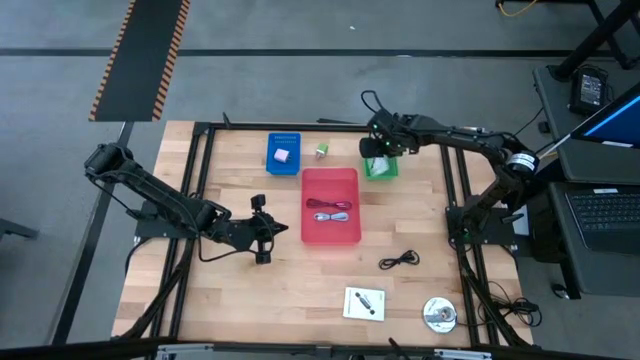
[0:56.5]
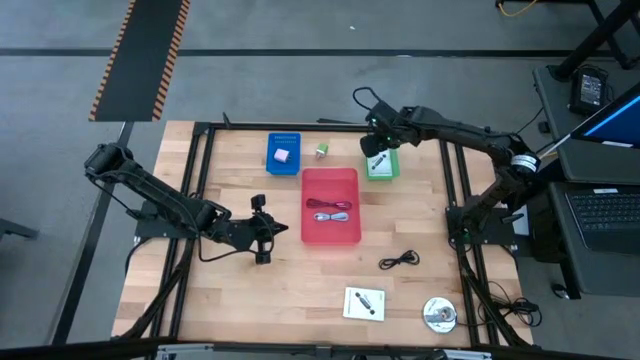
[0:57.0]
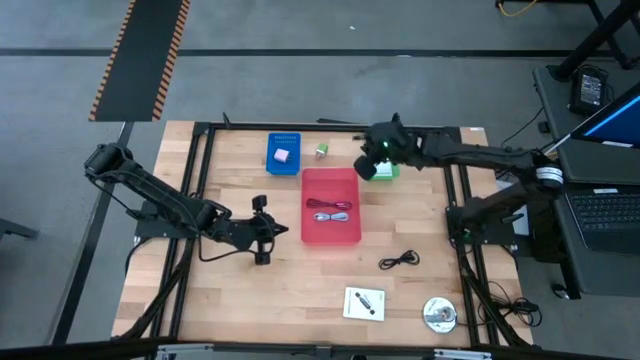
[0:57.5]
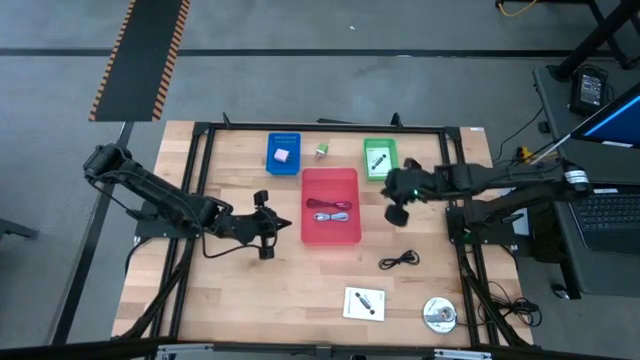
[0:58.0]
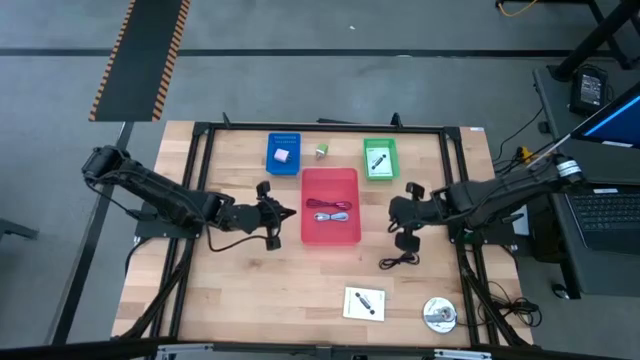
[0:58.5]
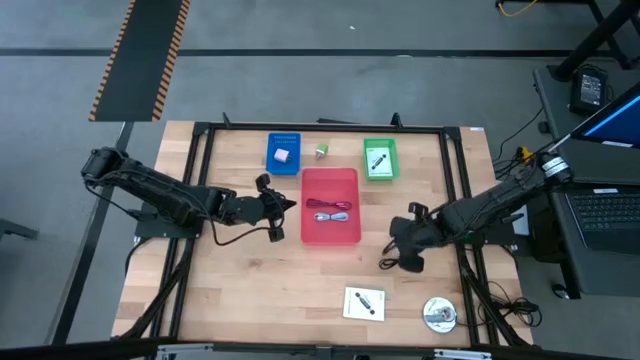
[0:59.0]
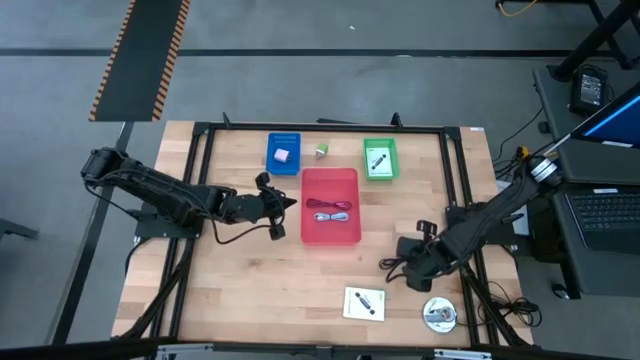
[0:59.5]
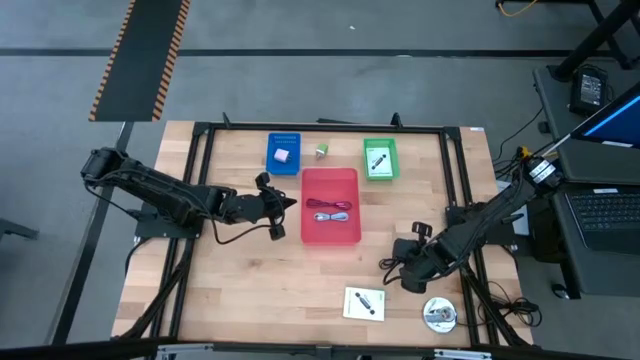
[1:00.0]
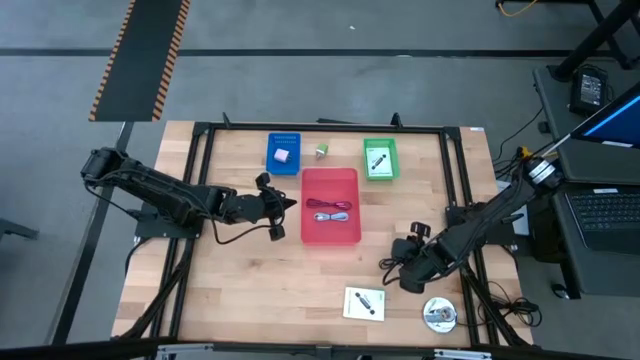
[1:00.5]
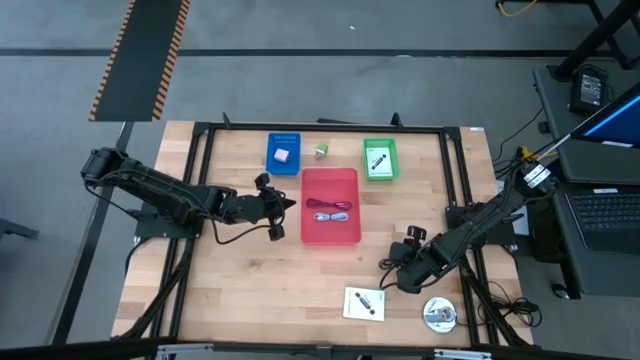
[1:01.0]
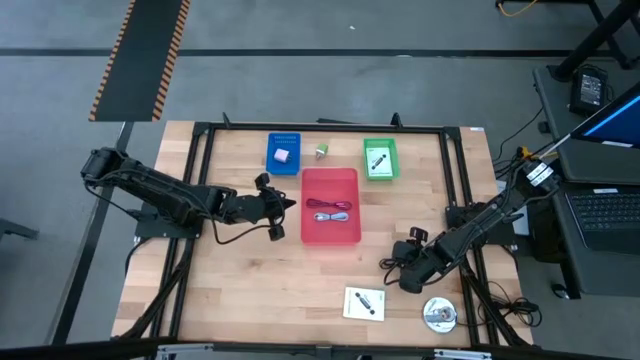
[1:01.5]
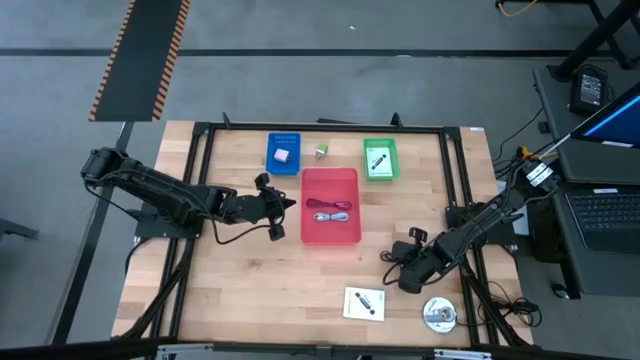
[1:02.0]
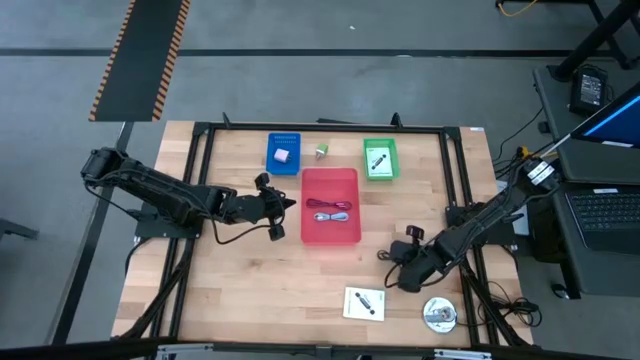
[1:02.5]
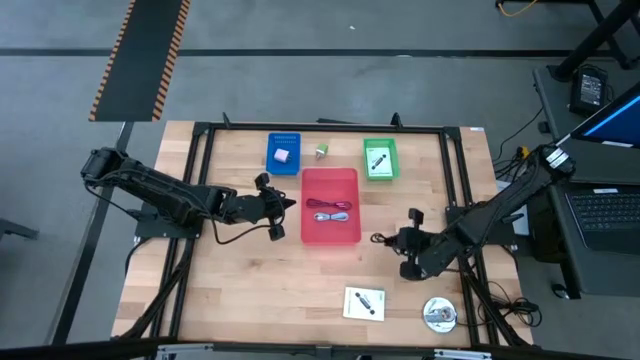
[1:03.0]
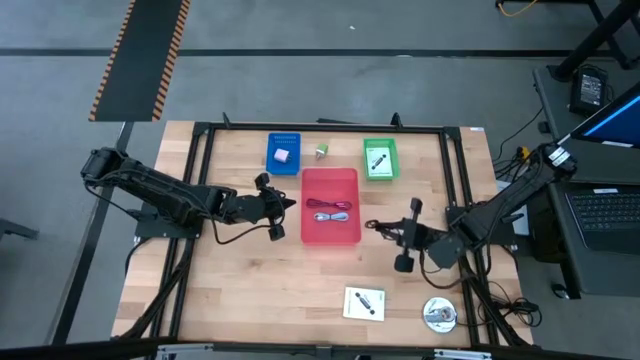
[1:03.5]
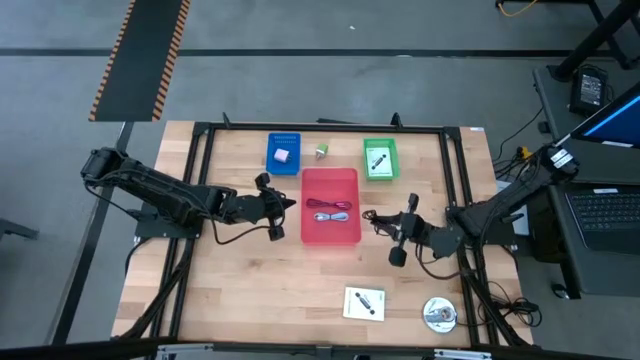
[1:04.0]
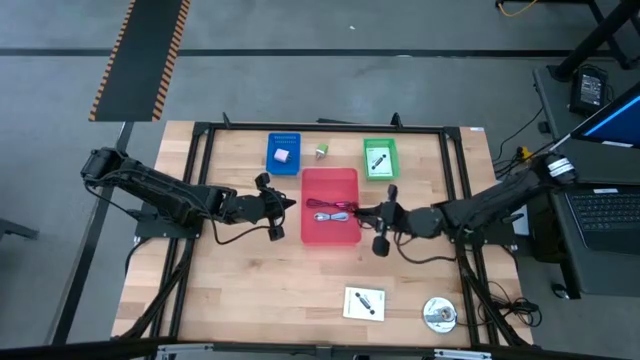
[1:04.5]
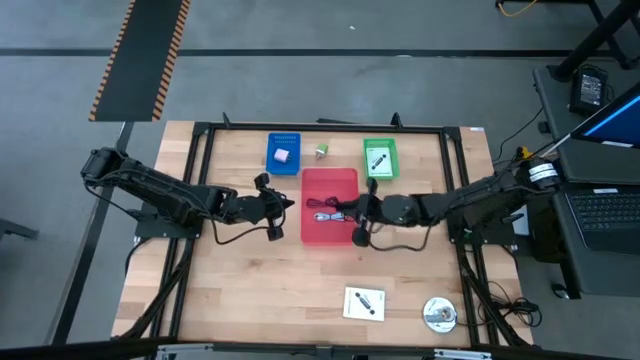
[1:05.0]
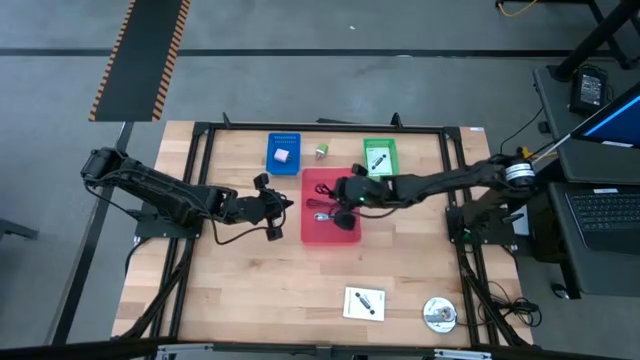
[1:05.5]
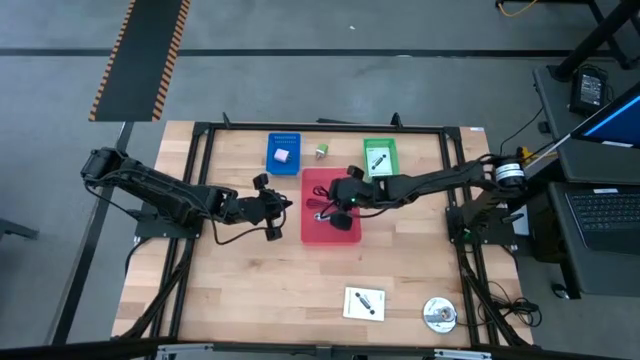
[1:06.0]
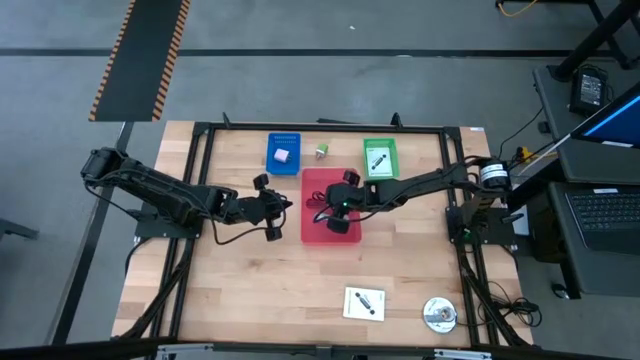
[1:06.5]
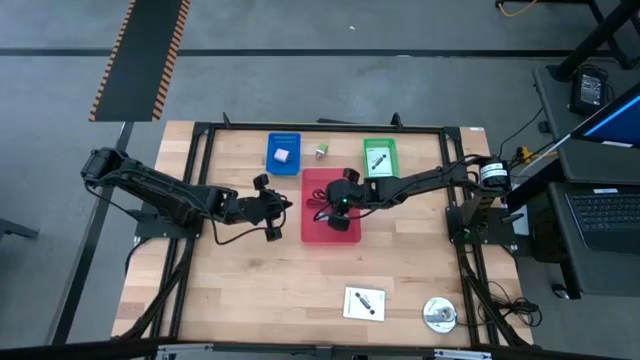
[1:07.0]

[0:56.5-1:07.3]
Task: Pick and place items into bin
Put the black charger cable into the red bin

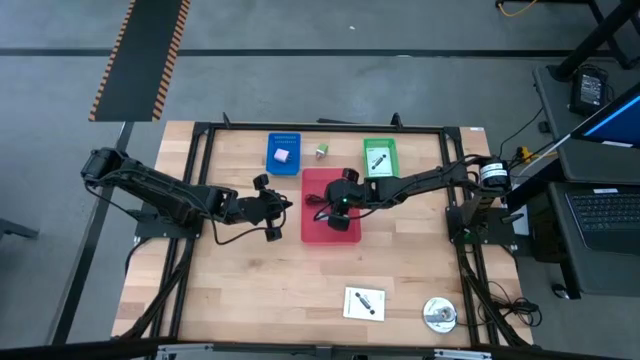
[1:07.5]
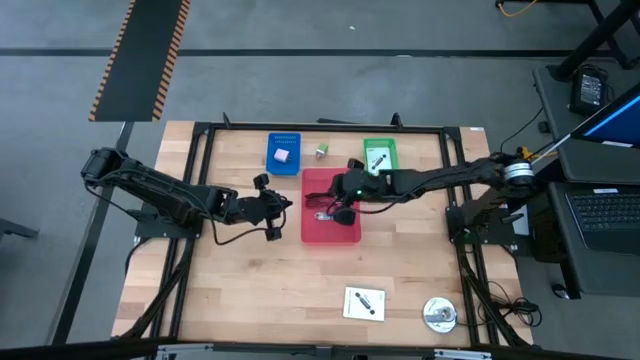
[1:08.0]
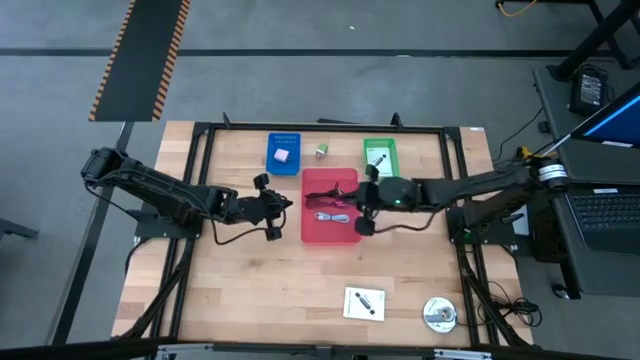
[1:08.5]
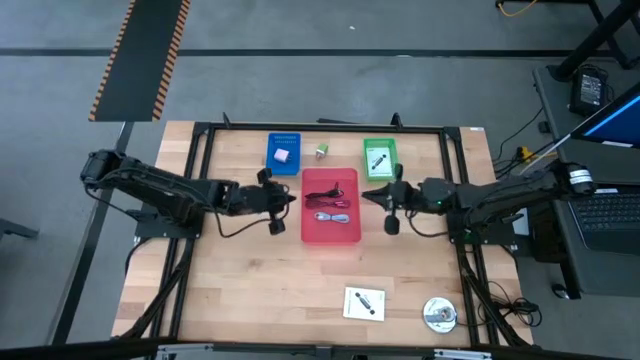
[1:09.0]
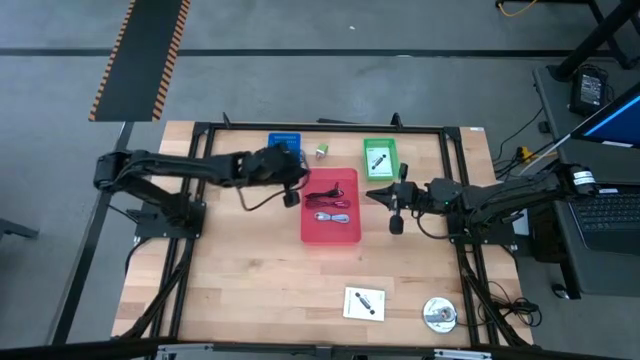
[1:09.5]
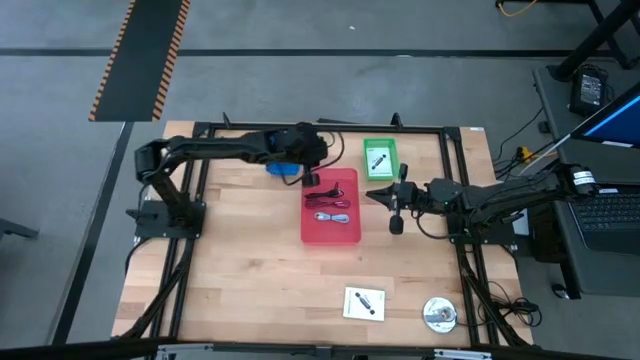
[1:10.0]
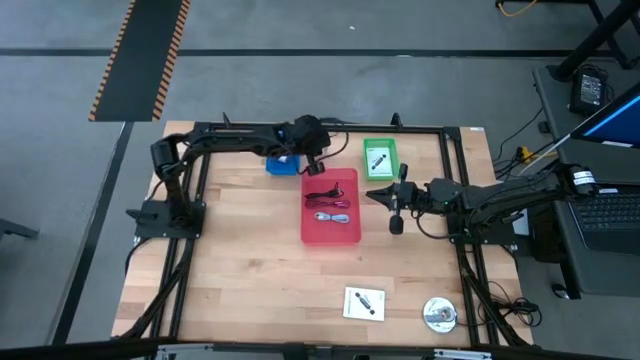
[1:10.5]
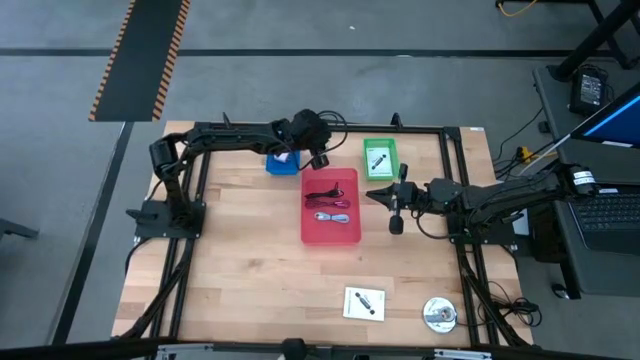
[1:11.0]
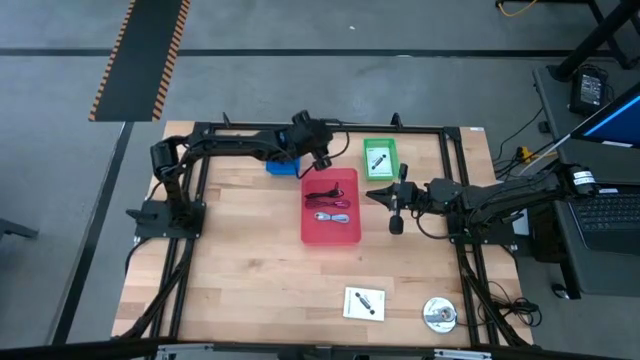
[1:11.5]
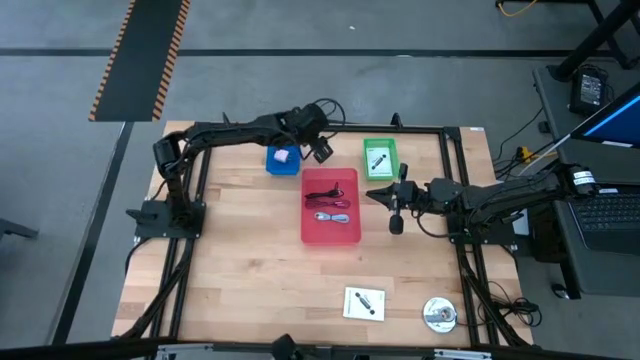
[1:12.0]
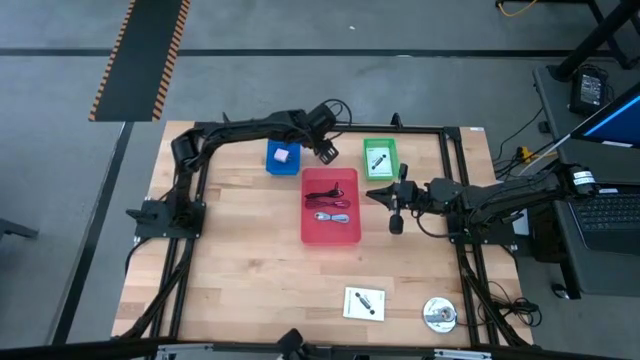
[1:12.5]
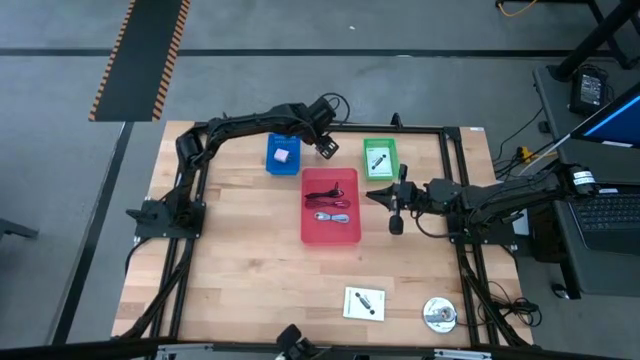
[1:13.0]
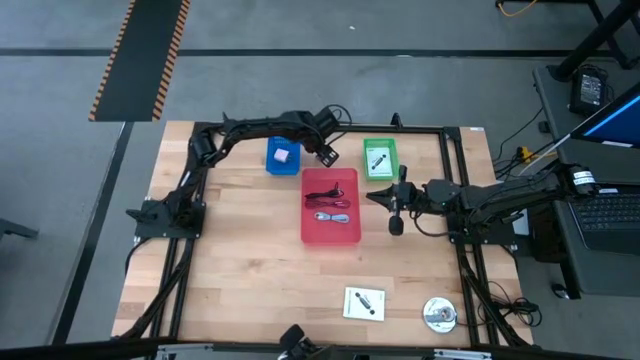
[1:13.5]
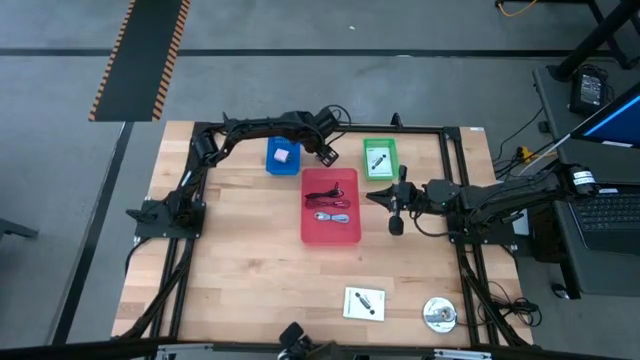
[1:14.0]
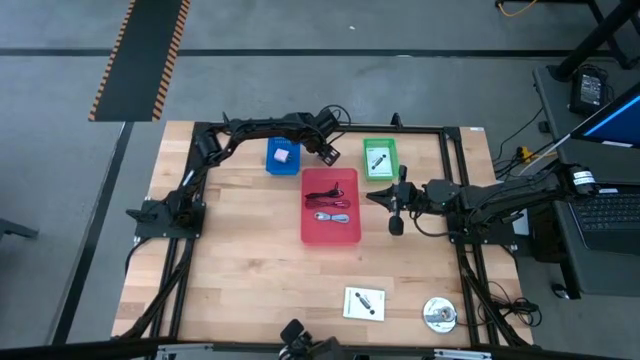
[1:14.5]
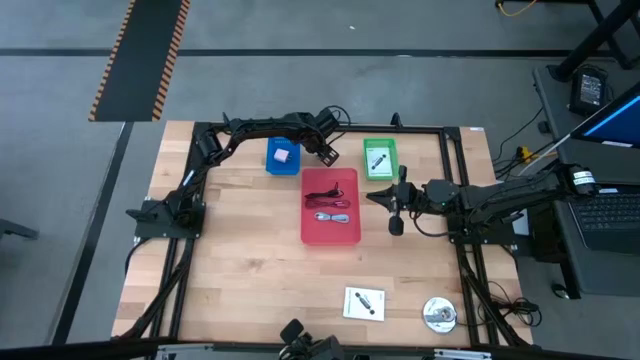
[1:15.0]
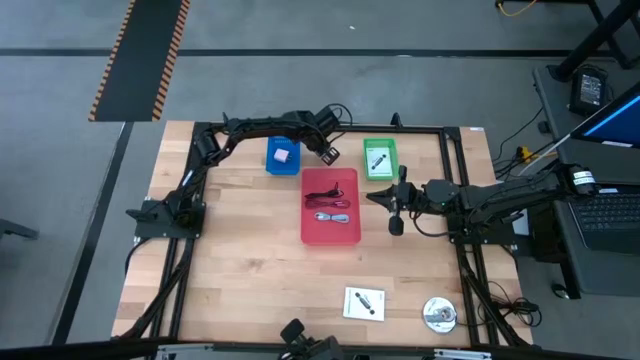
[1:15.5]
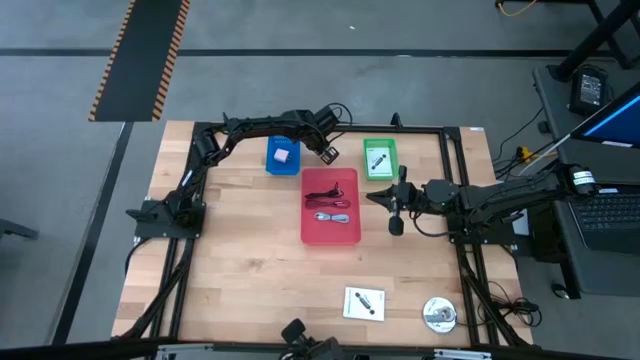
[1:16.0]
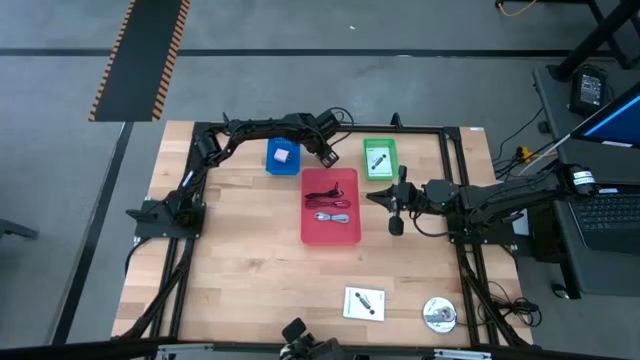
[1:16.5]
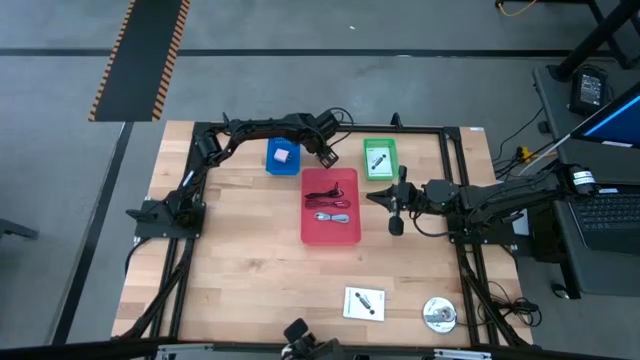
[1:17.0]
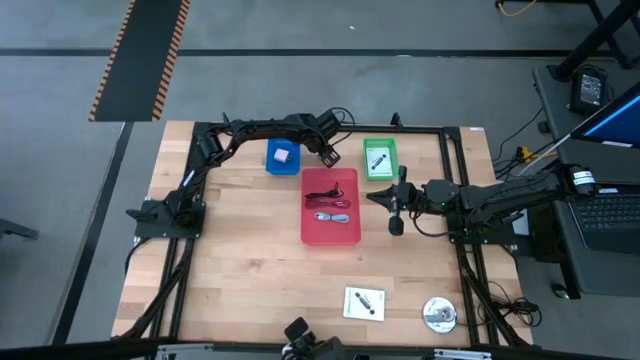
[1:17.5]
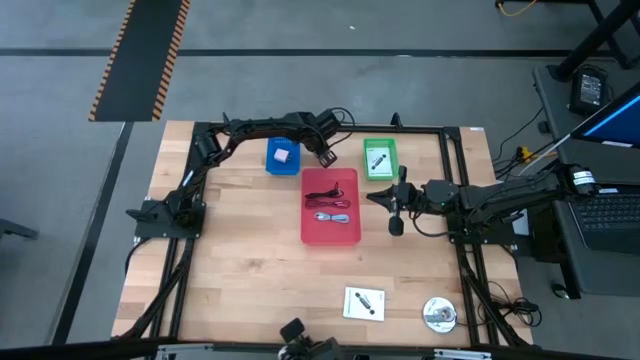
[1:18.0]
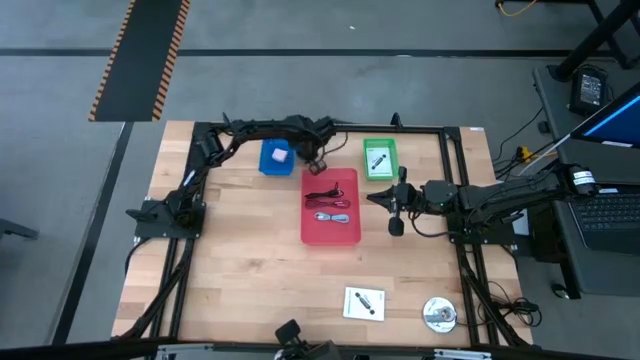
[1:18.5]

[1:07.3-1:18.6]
Put the green charger adapter into the blue bin
